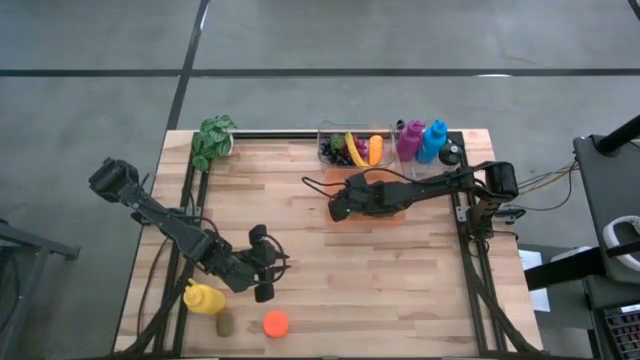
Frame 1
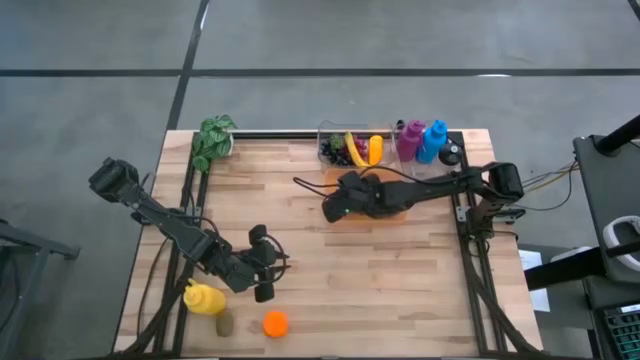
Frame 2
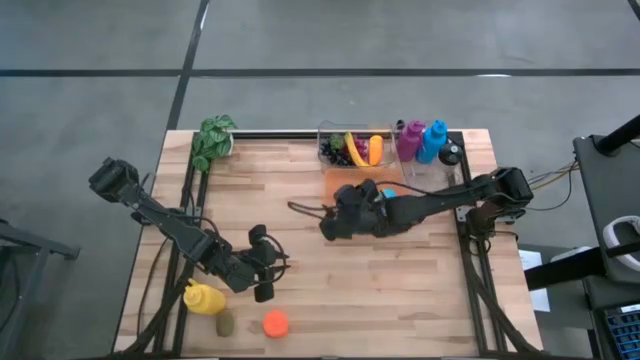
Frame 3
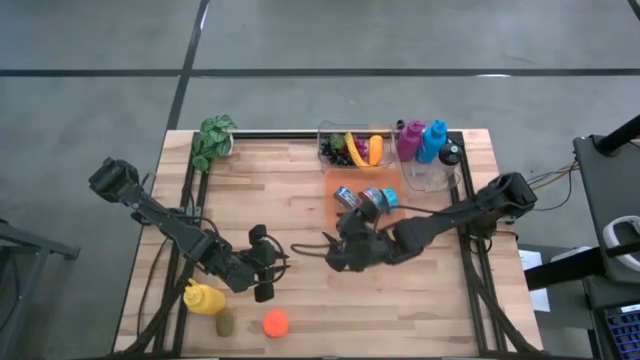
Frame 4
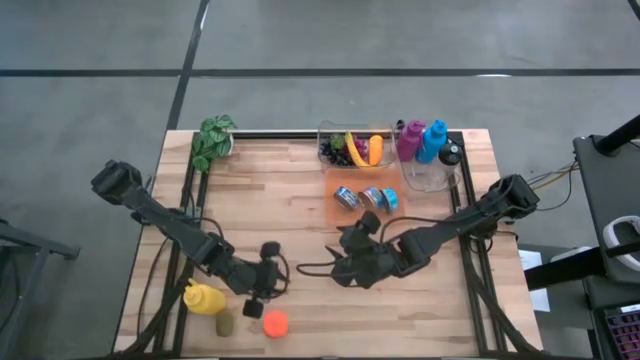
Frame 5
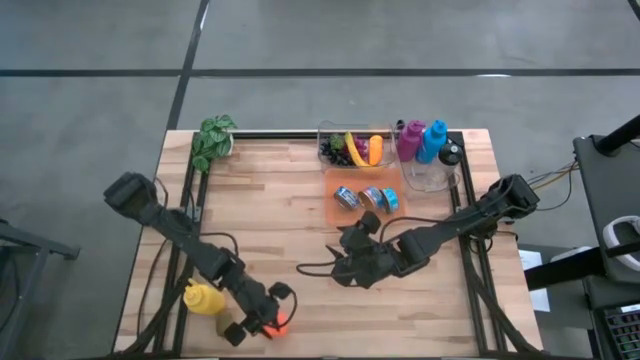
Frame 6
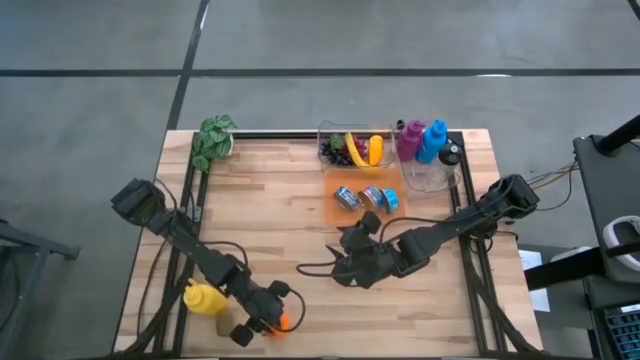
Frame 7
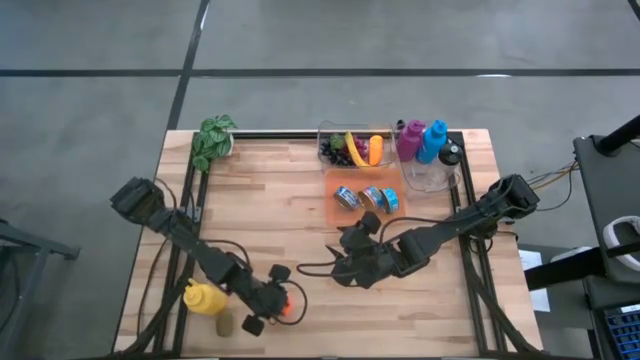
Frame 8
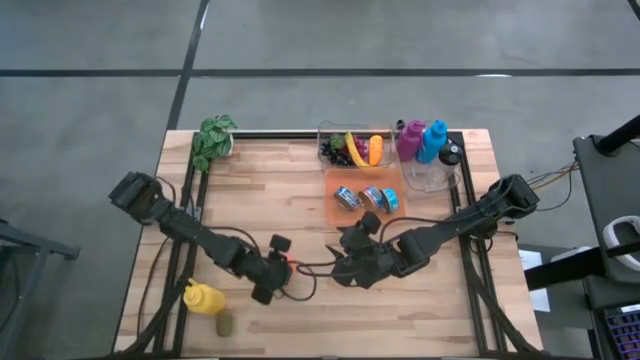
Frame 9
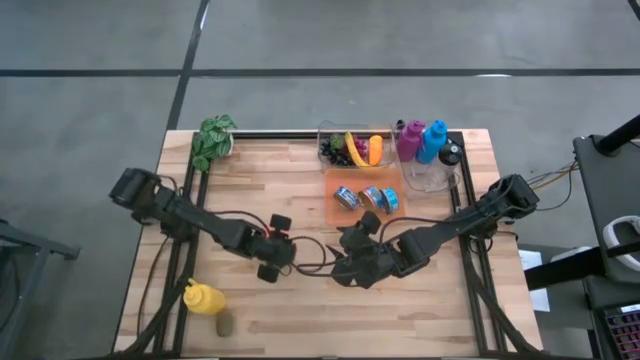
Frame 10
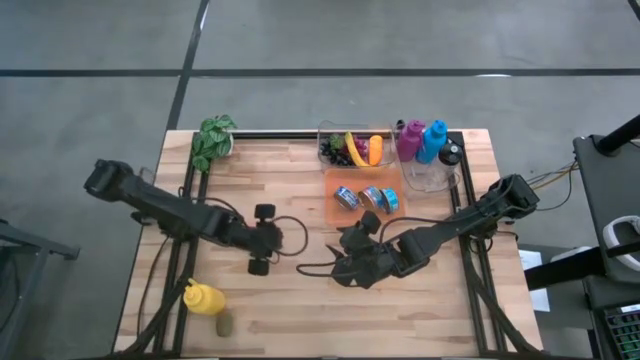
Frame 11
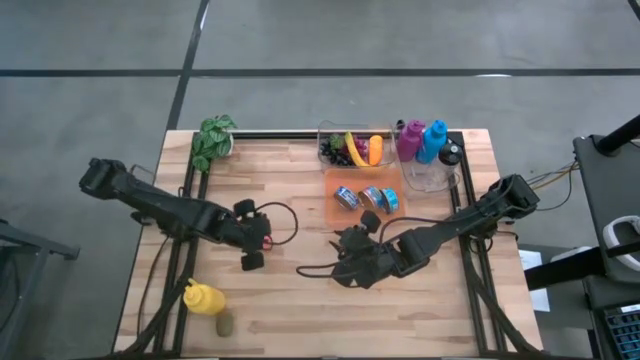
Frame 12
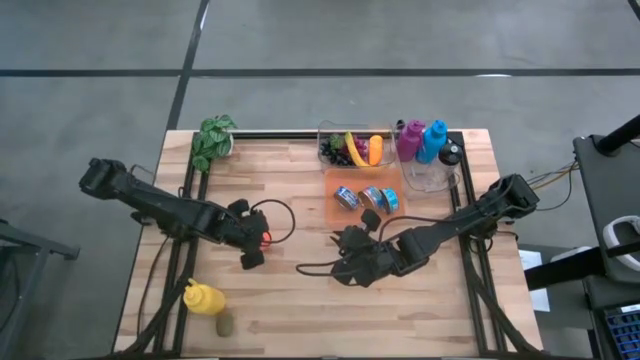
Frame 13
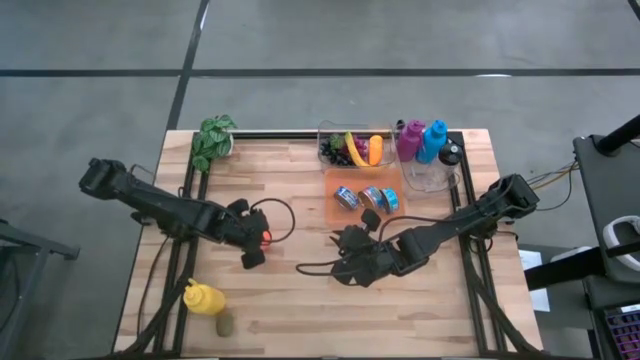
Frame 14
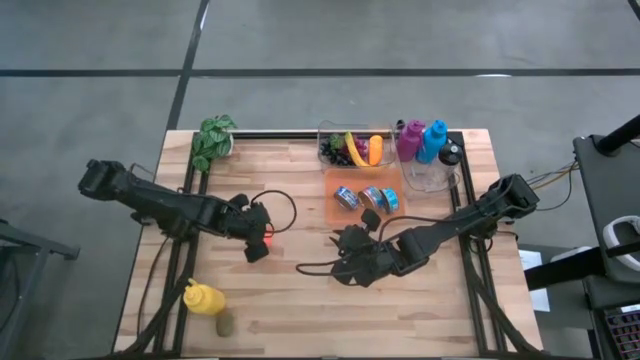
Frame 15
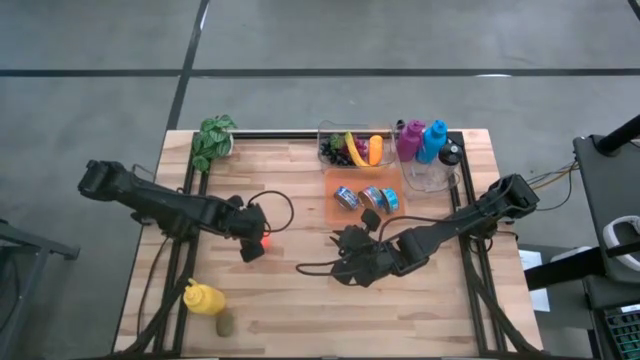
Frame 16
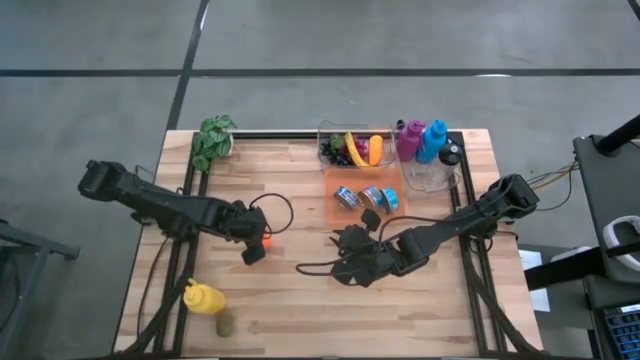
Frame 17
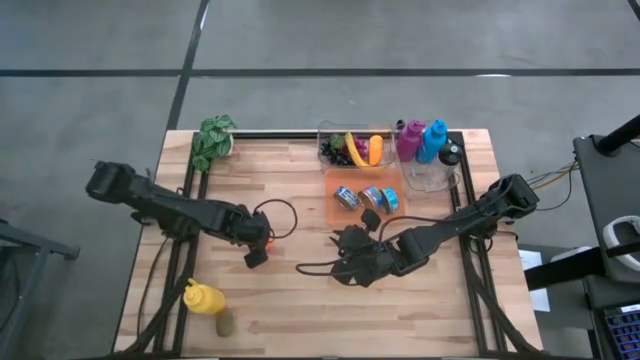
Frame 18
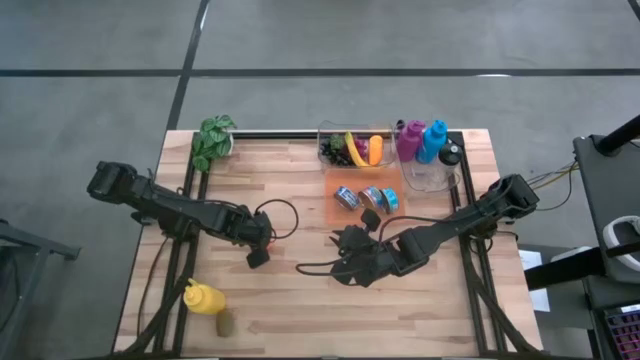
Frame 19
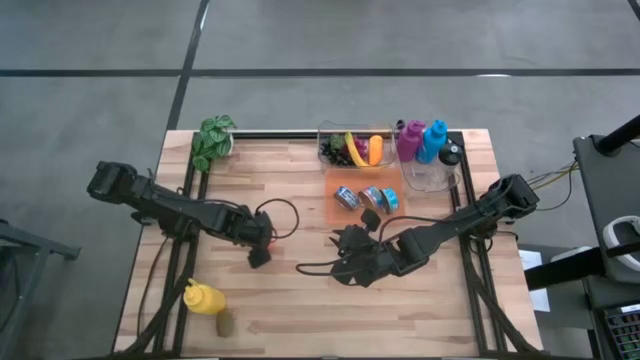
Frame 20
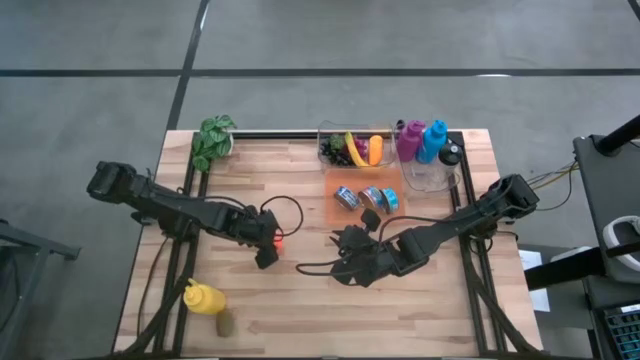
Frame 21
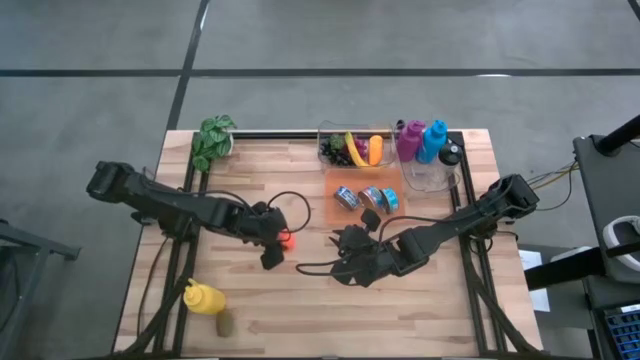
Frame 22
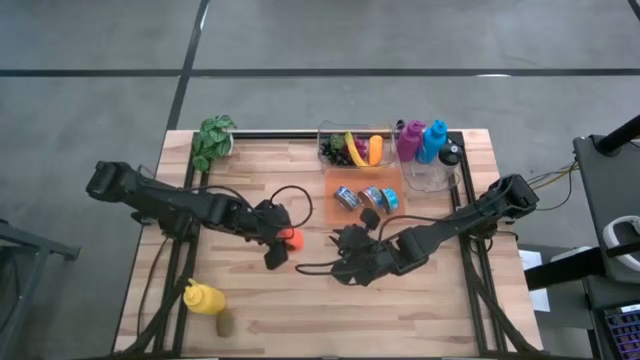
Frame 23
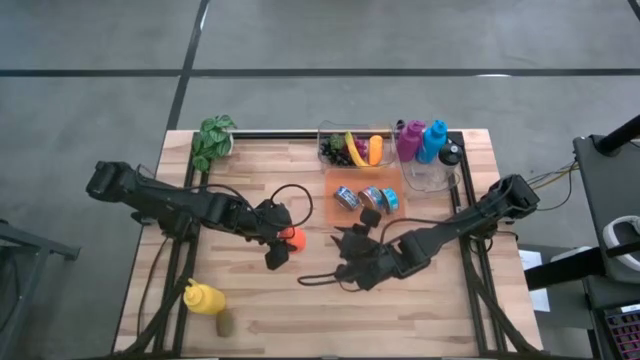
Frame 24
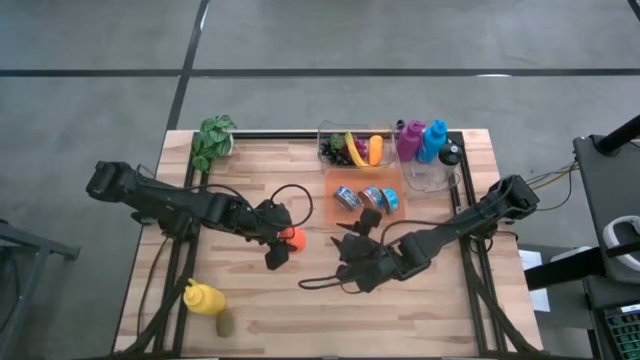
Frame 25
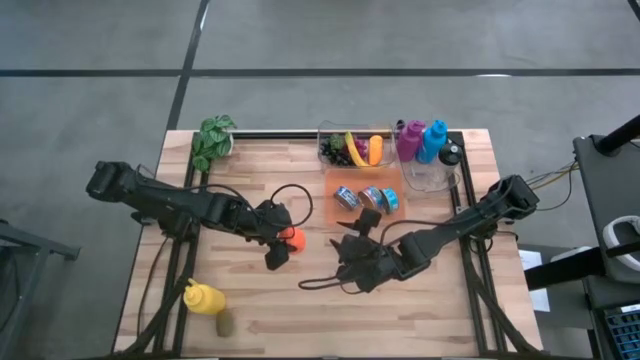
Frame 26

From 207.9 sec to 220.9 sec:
Task: Pick & Place Food Item
Put the orange into the left transparent bin

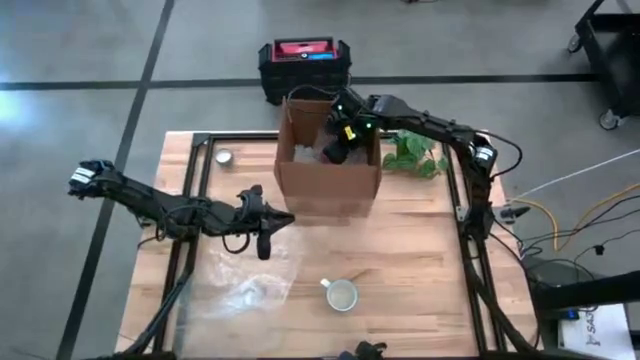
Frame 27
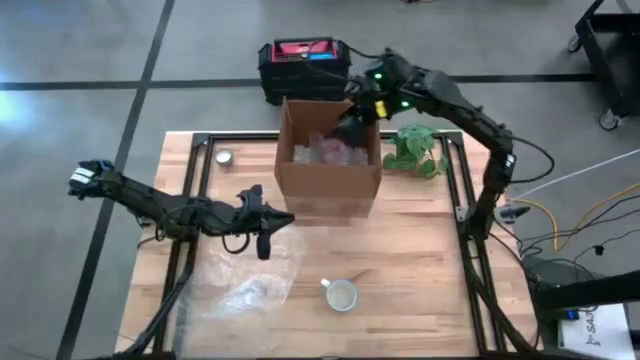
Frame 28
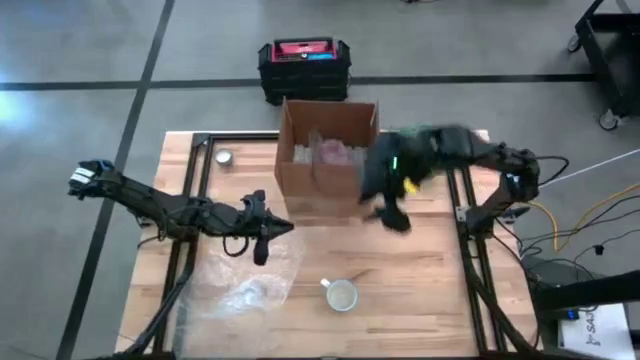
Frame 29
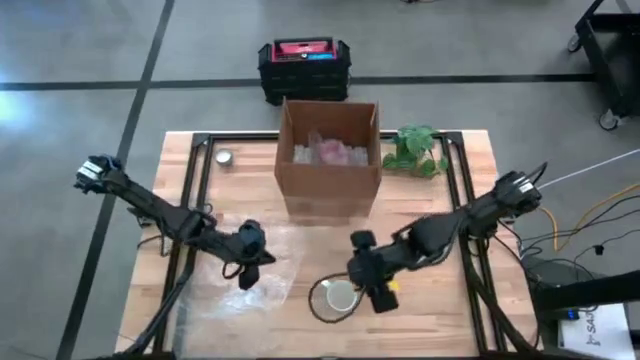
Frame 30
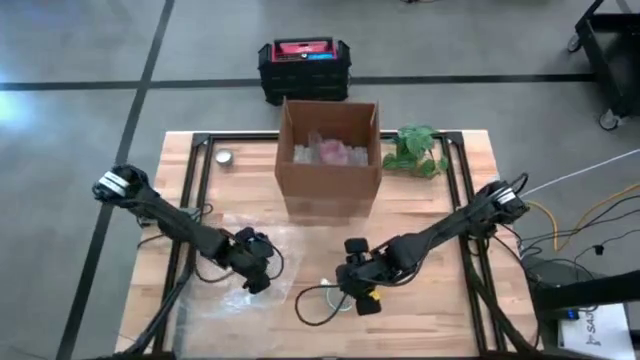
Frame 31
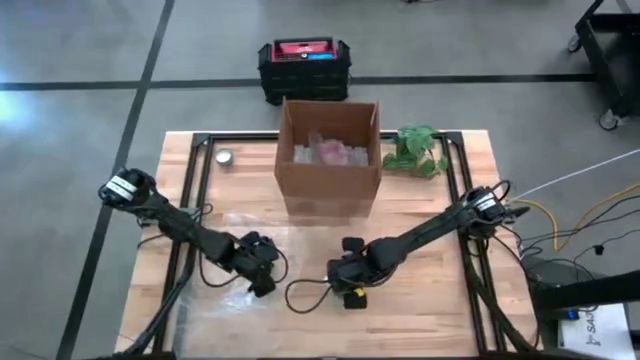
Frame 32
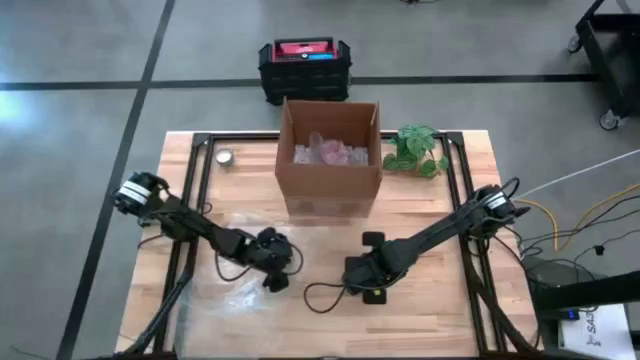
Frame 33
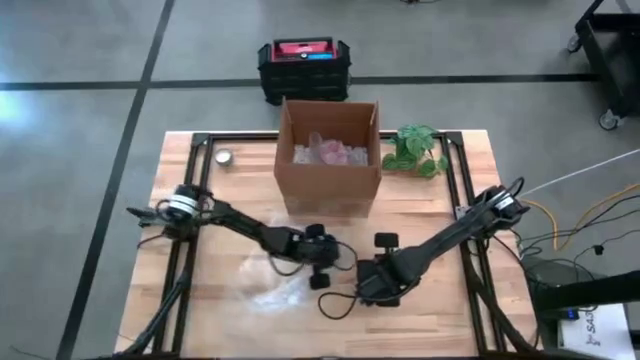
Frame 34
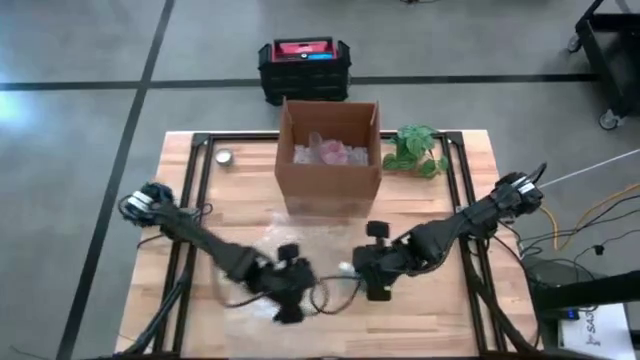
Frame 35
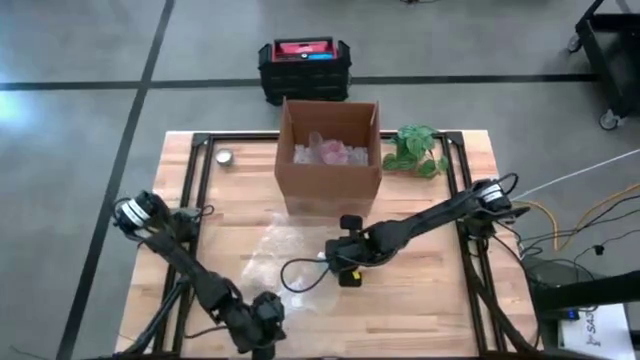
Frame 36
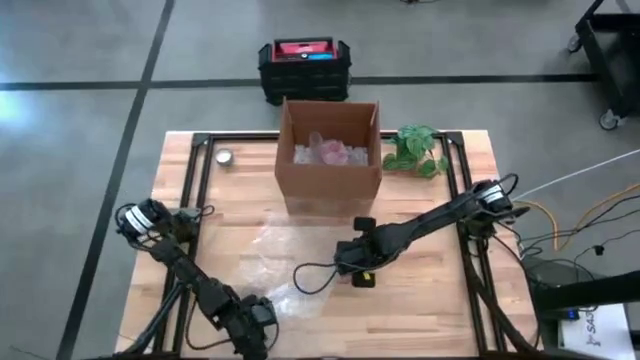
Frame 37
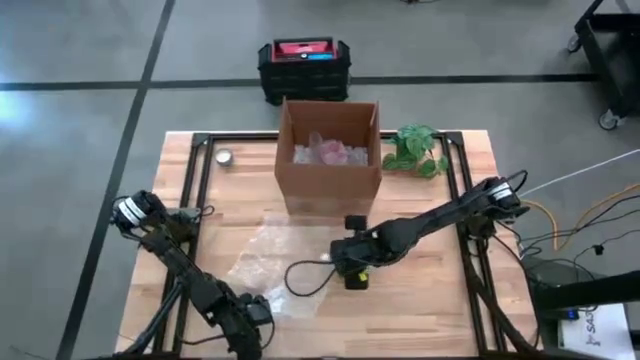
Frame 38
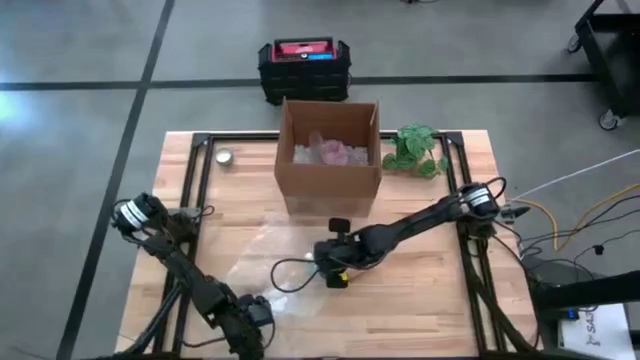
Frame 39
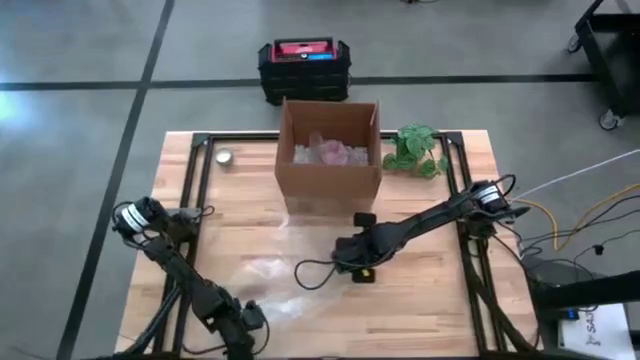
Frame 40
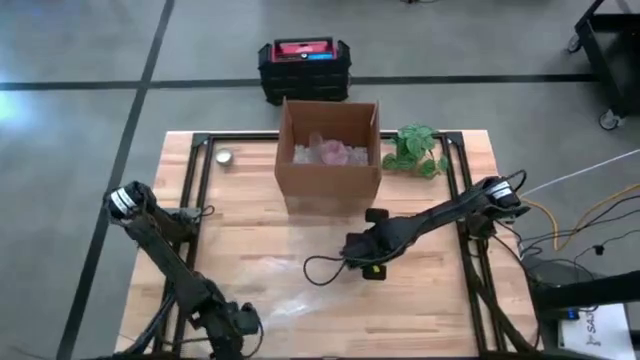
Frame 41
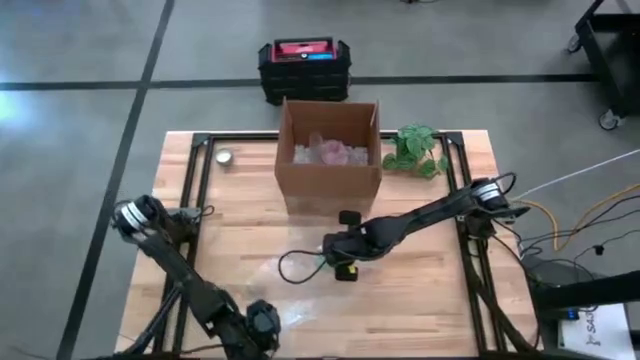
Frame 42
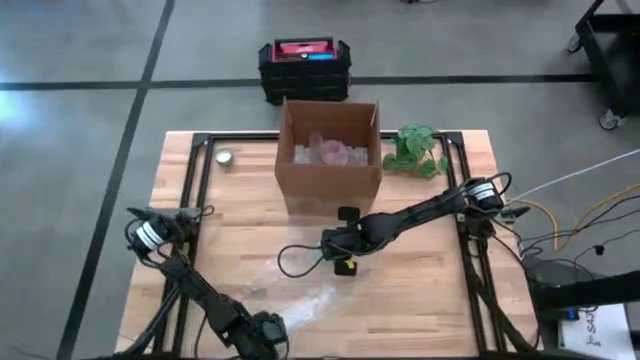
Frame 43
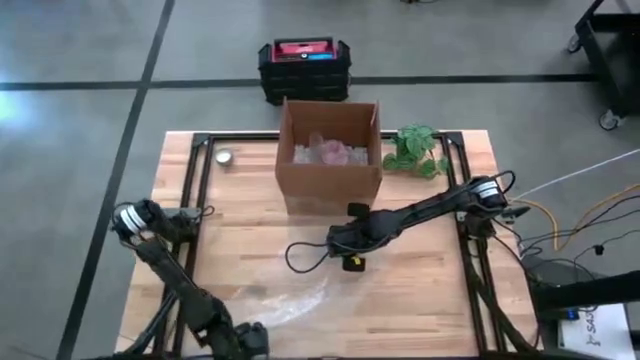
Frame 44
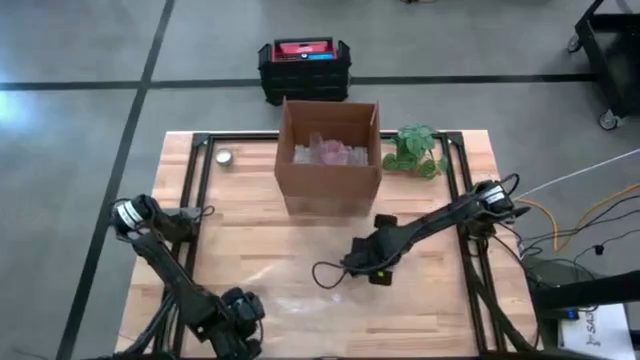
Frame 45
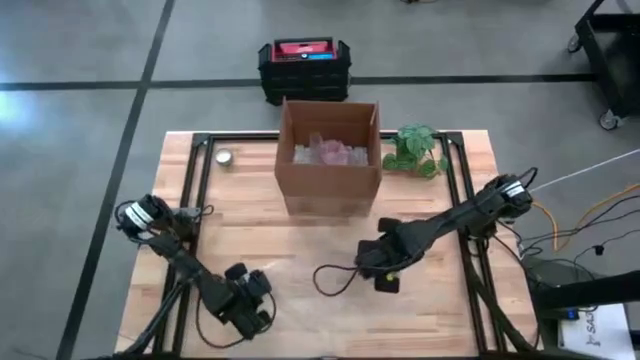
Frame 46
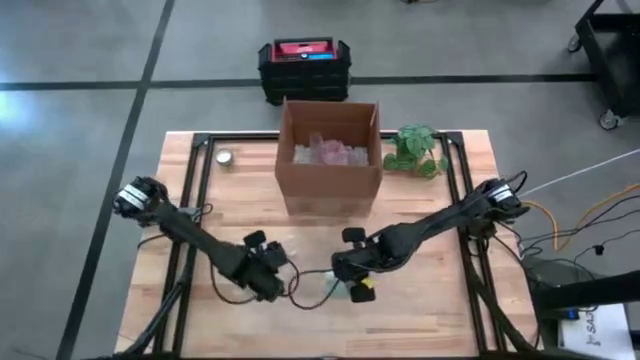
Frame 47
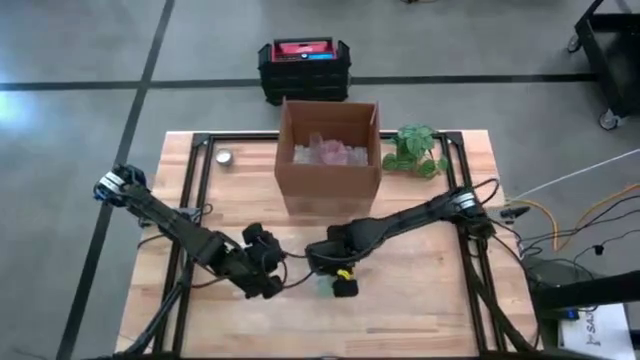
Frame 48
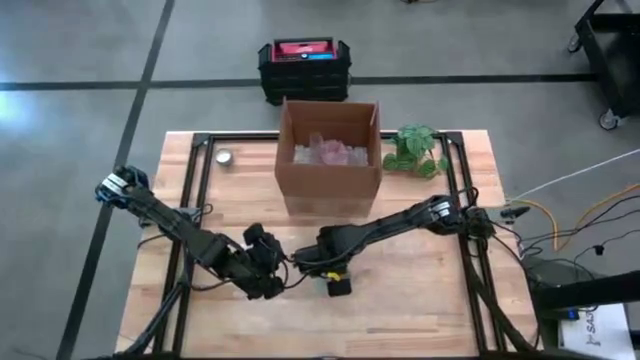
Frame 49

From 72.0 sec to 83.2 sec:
Task: wrap mug
Wrap the white mug in bubble wrap
